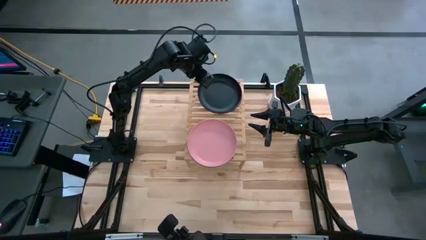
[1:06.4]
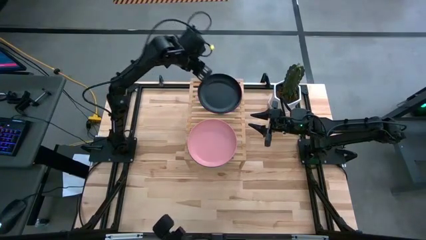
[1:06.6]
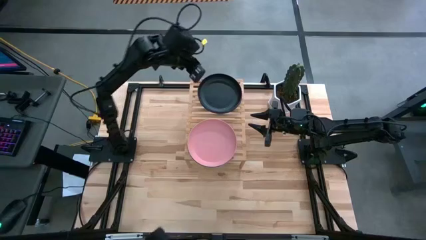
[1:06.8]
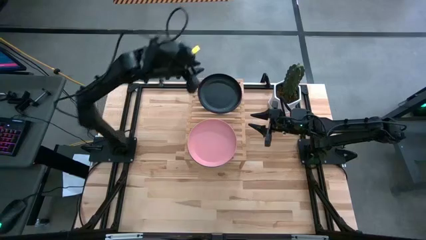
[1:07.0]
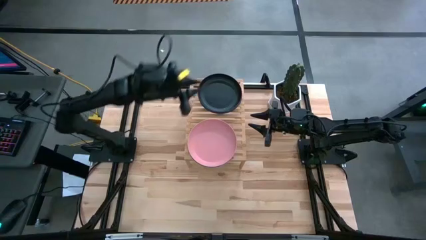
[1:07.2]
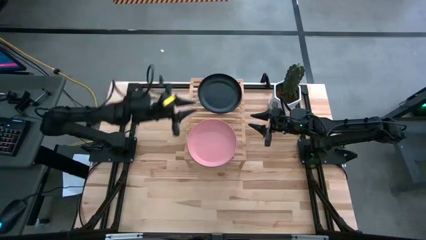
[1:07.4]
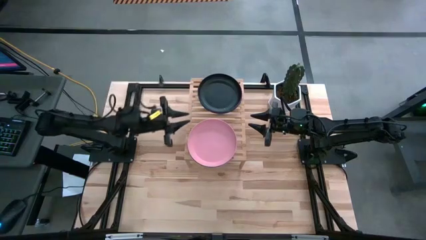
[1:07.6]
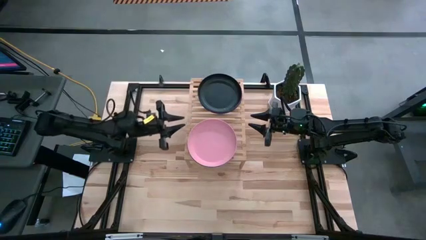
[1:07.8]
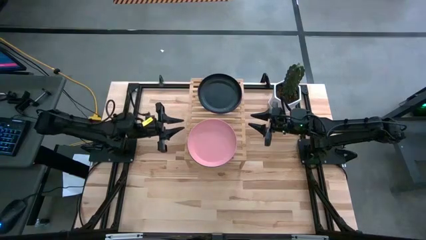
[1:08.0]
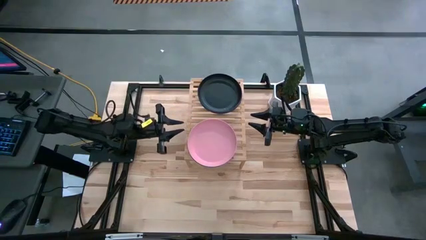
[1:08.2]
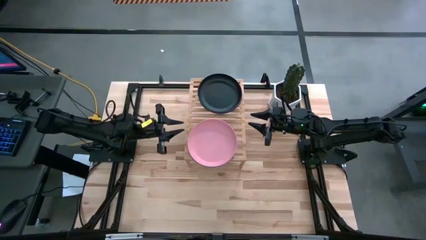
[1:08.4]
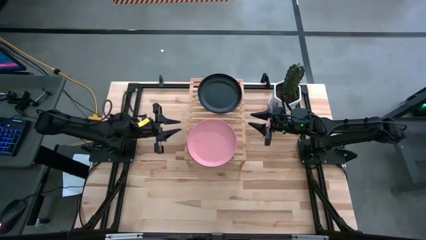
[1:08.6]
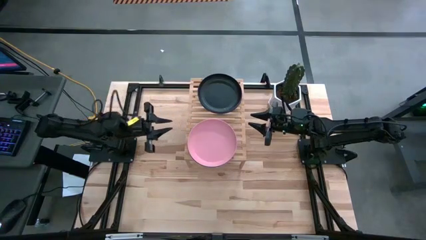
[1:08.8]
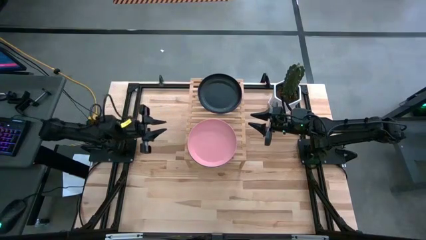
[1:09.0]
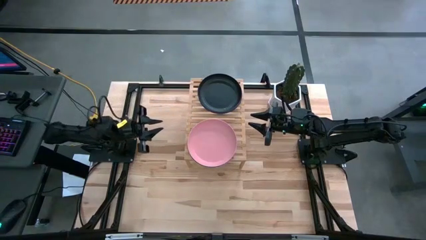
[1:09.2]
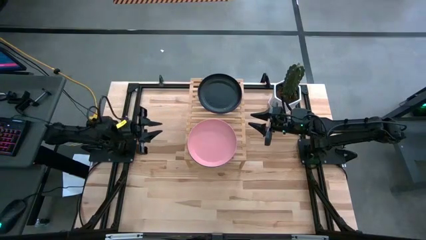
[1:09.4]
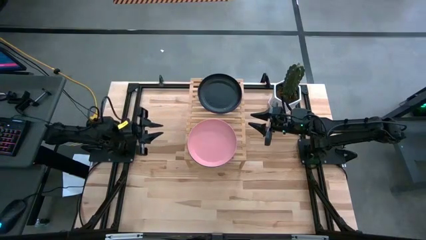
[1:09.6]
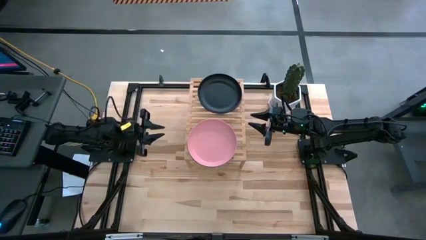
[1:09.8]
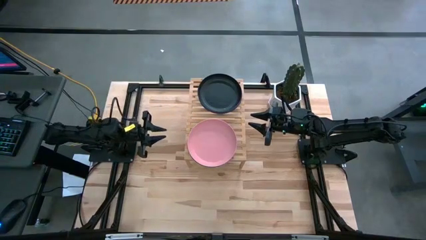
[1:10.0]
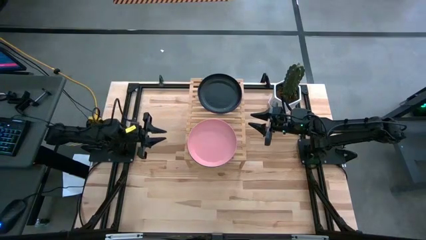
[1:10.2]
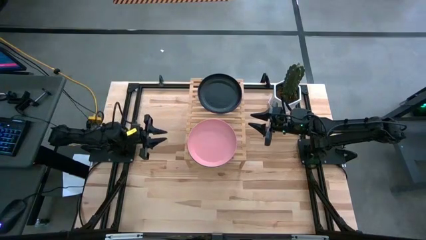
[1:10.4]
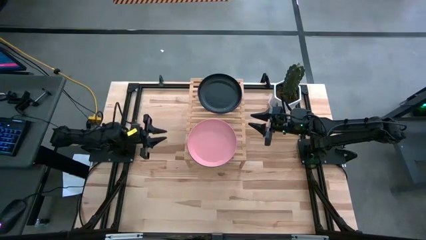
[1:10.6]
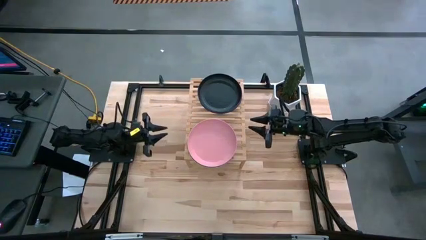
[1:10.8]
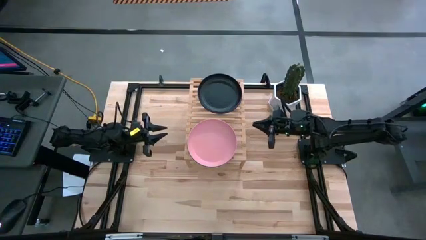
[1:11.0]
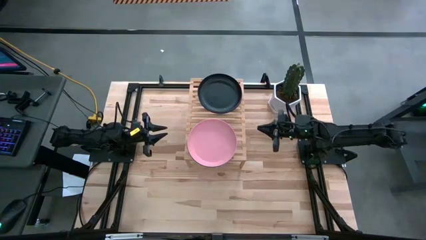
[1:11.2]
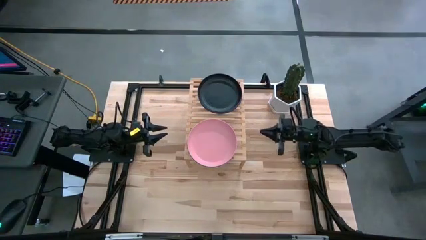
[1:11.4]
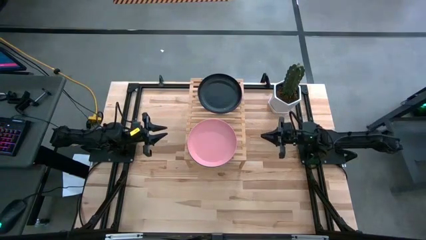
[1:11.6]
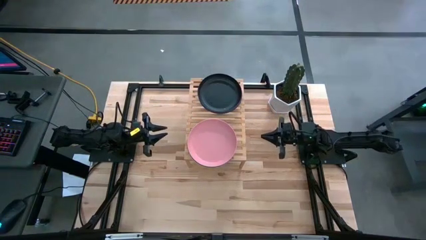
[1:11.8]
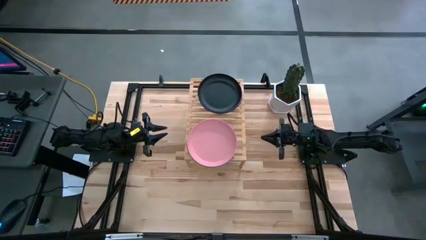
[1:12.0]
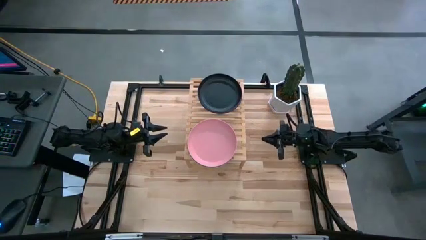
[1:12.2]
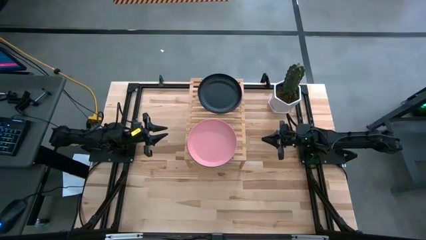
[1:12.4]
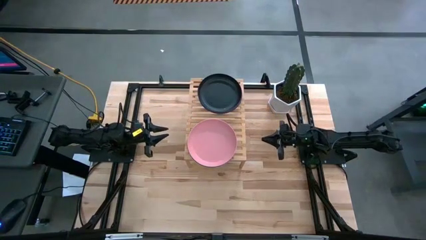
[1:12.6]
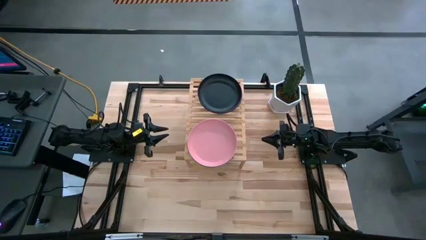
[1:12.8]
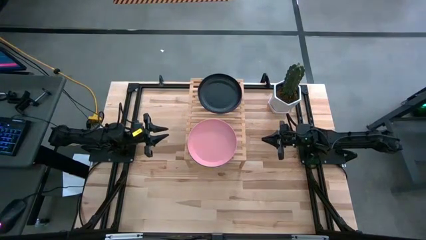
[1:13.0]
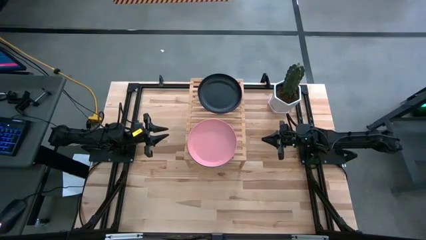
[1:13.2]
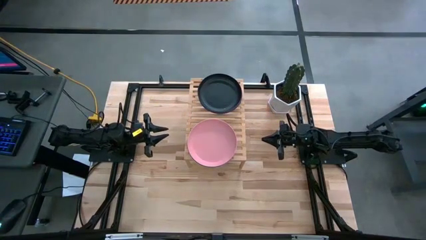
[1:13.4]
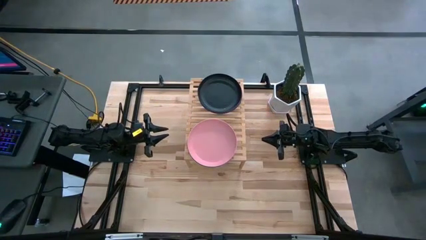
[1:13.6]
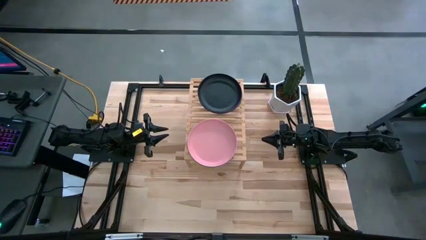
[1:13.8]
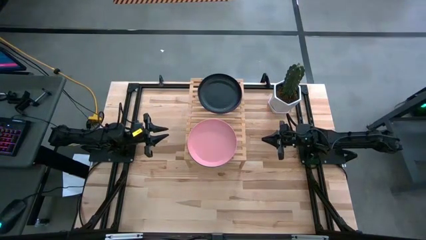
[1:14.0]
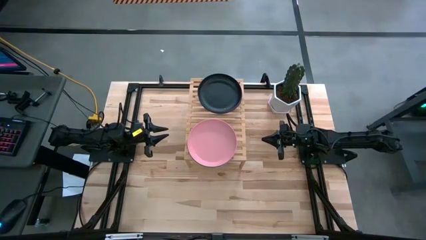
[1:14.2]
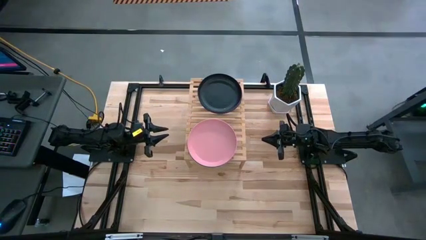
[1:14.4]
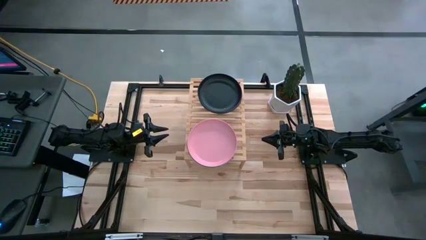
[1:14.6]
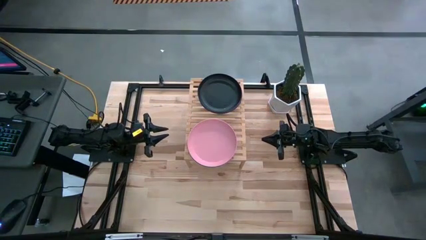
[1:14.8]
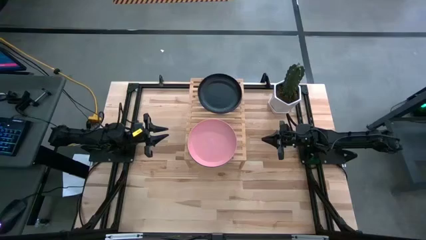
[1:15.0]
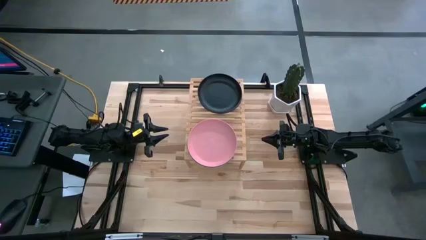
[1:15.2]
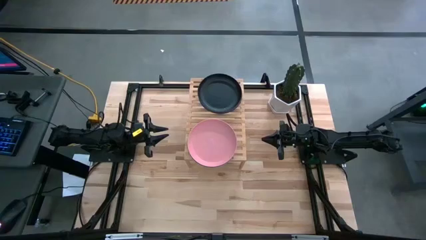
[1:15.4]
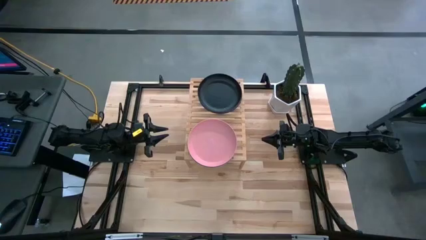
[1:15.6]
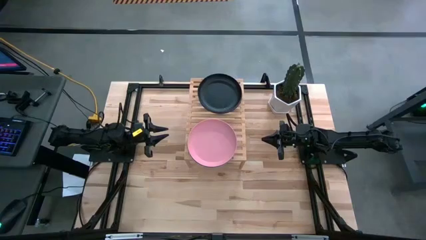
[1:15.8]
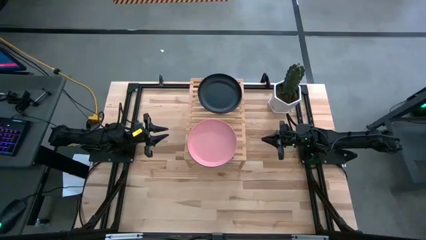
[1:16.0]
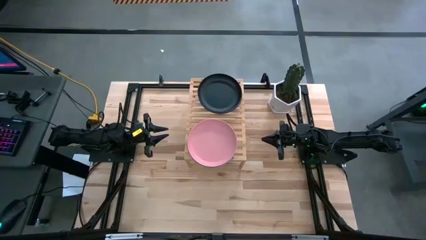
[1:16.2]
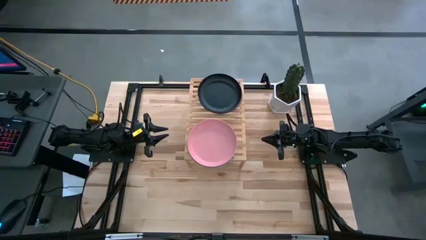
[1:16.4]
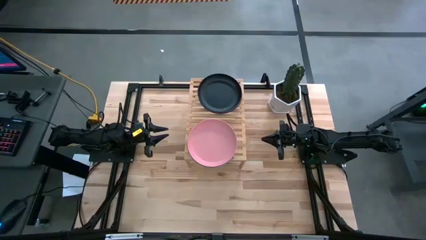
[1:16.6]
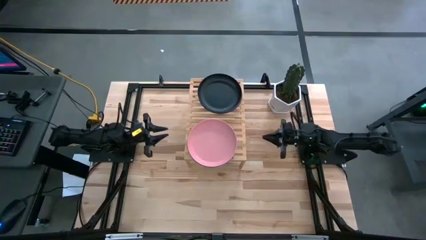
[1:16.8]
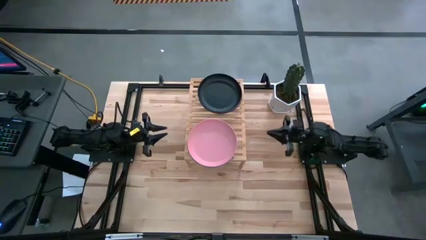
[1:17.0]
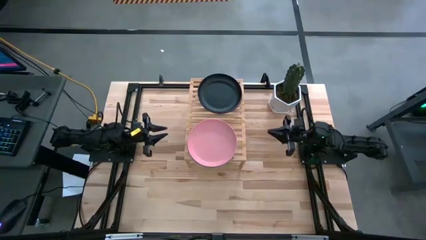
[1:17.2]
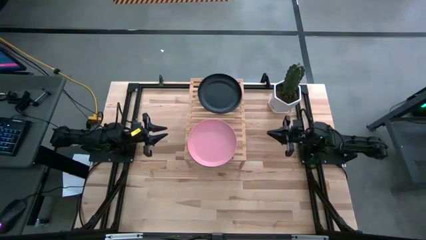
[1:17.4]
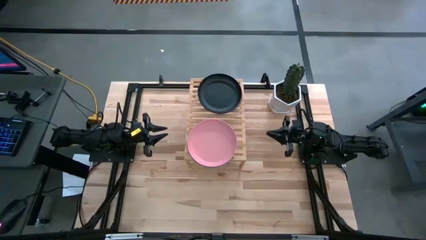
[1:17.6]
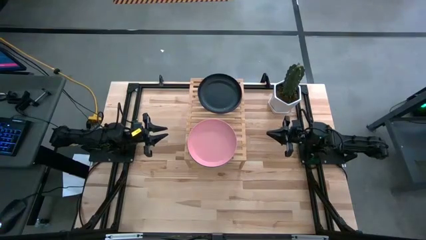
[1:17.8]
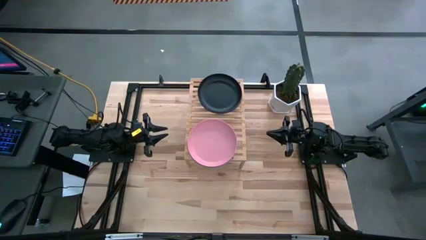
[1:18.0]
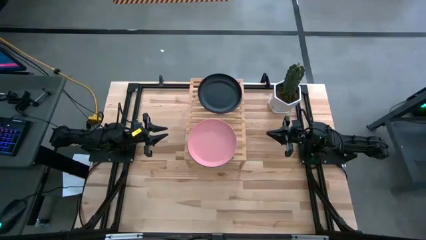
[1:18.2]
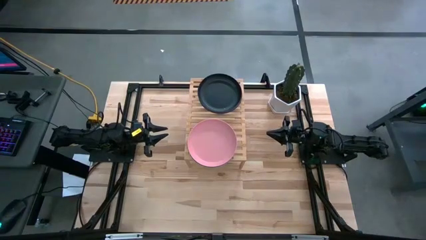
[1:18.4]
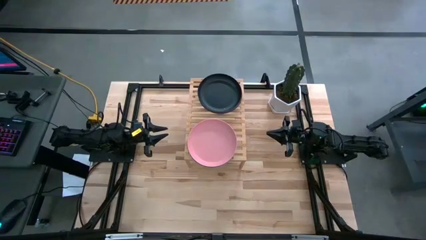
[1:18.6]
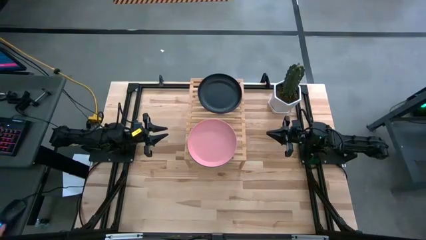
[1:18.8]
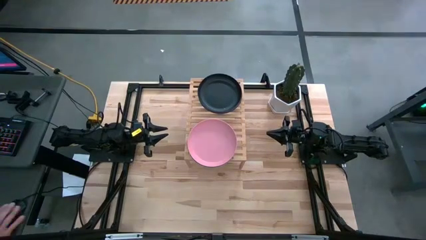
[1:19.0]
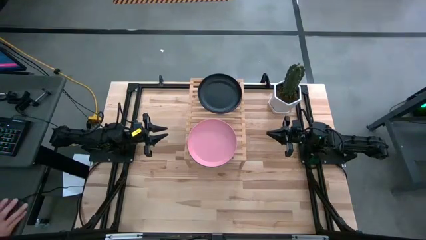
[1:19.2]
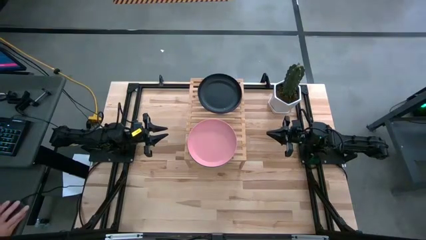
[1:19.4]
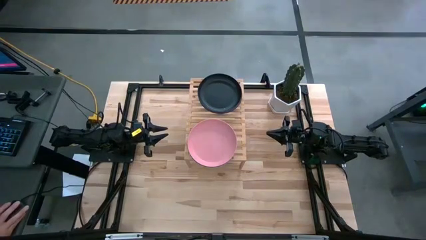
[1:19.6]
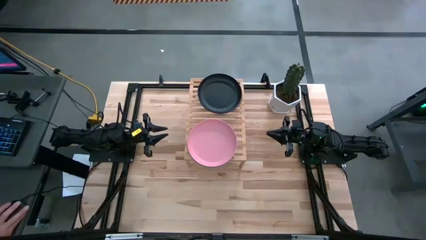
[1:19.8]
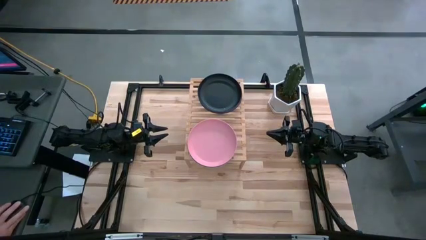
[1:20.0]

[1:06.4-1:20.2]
Task: Place and stack plates onto a shelf
Return to Home Position

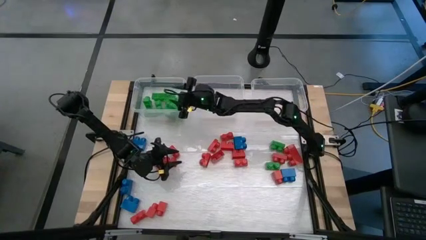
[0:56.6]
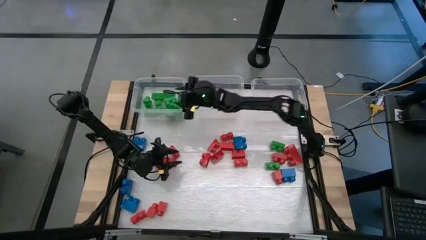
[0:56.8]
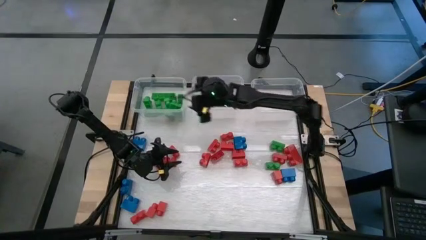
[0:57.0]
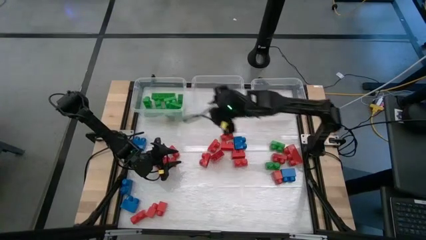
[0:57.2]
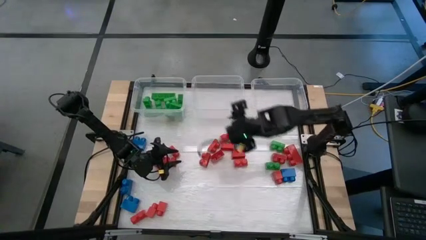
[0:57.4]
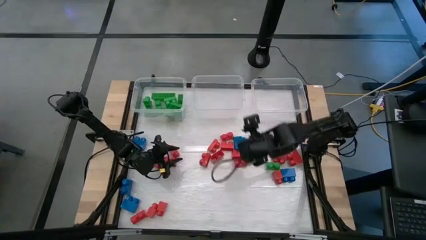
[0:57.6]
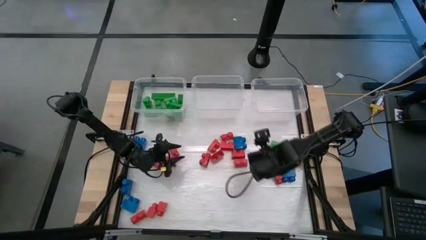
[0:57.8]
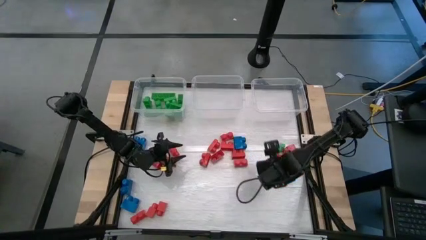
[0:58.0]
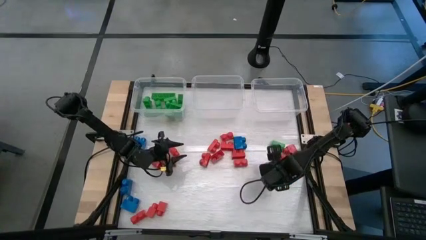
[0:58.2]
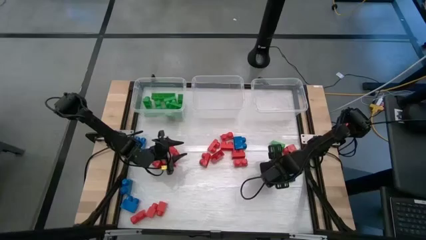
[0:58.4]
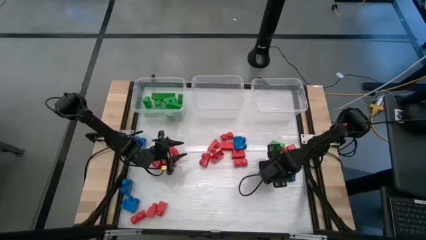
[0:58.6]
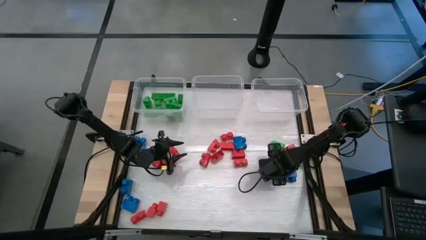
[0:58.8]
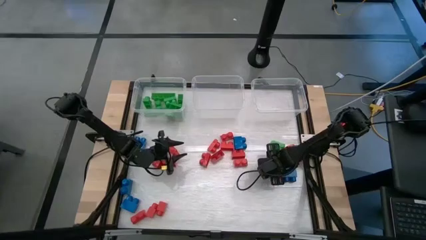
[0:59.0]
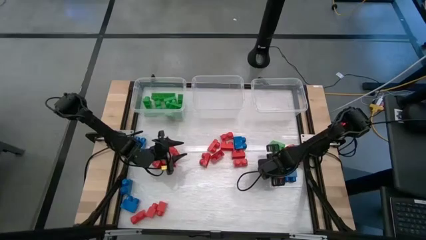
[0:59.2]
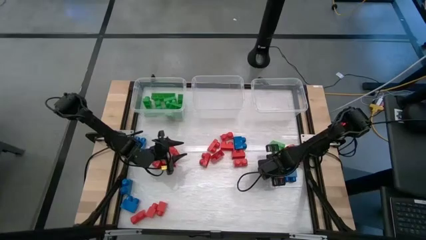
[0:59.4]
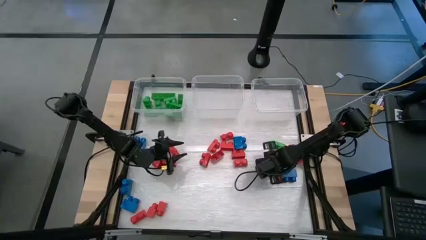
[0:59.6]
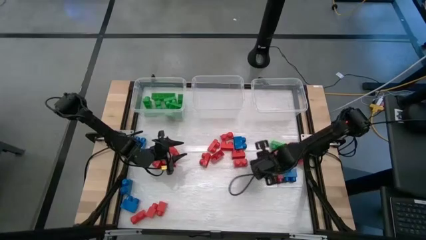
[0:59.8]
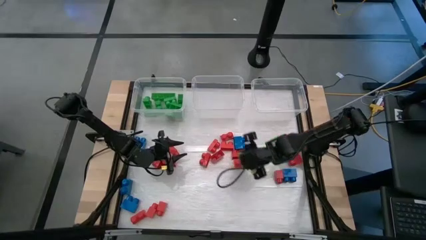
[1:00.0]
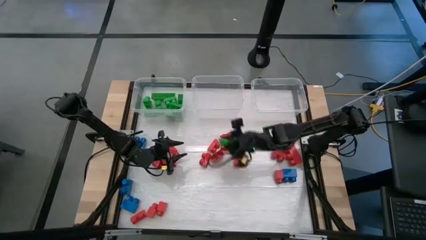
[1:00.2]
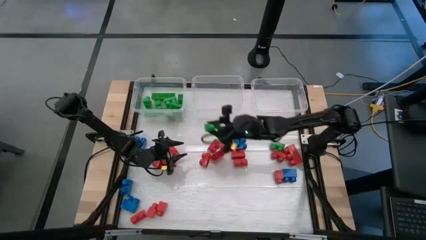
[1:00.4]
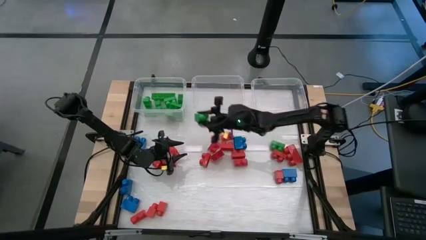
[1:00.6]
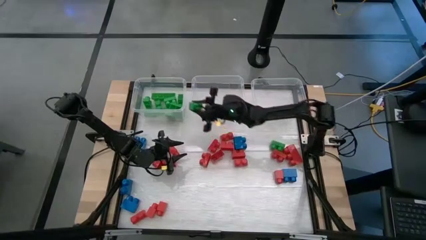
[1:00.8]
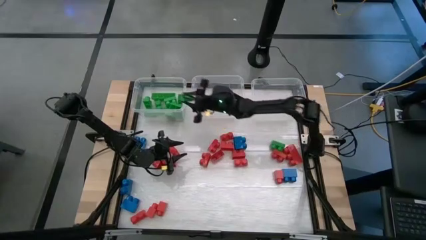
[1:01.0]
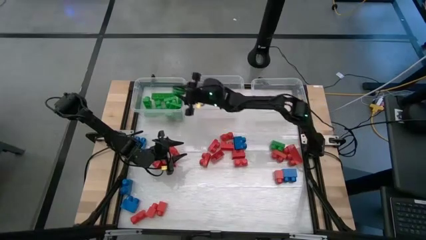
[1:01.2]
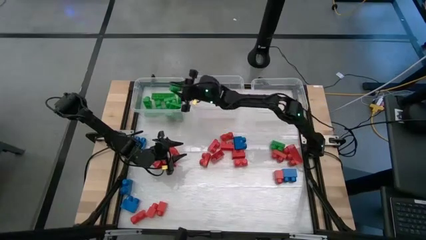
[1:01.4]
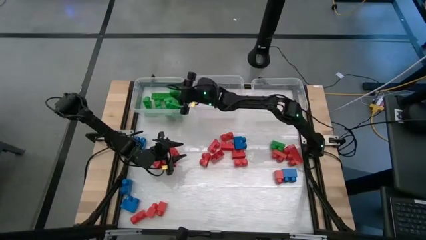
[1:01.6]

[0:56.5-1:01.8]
Task: Sort blocks
Put the green game piece into the left transparent bin
